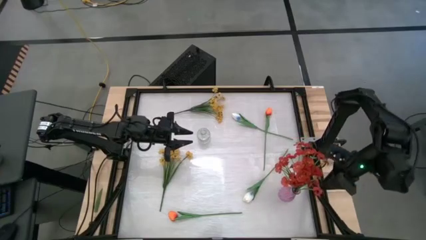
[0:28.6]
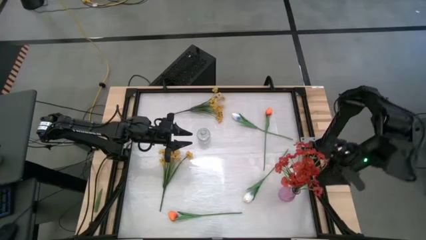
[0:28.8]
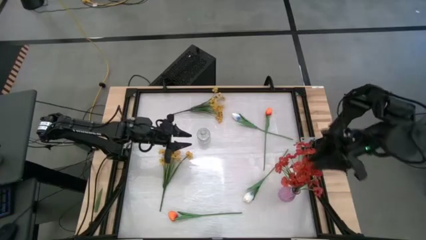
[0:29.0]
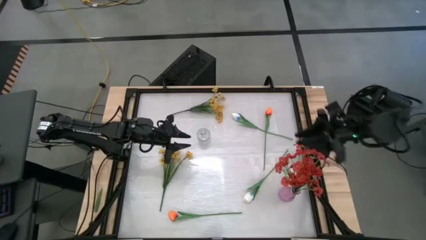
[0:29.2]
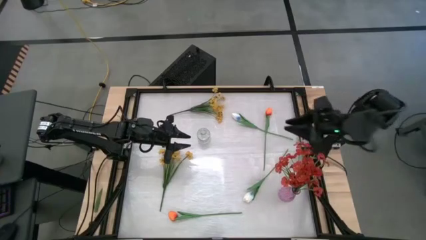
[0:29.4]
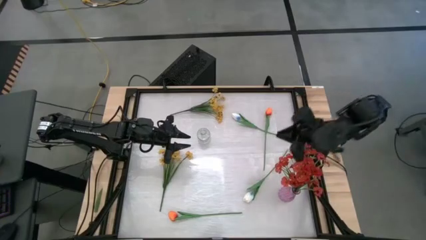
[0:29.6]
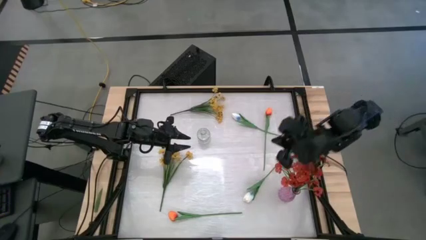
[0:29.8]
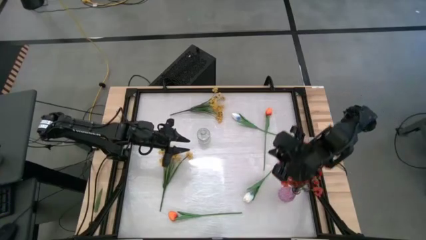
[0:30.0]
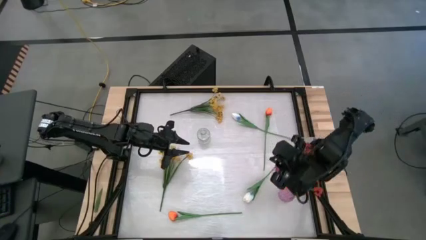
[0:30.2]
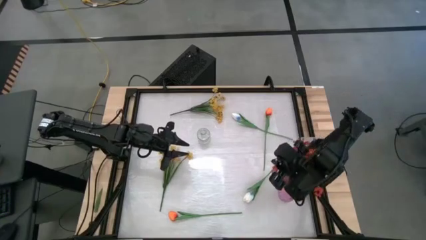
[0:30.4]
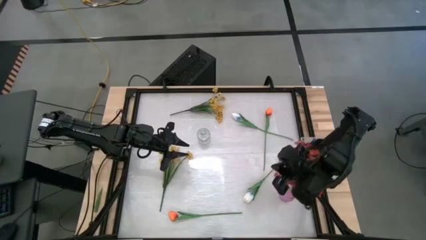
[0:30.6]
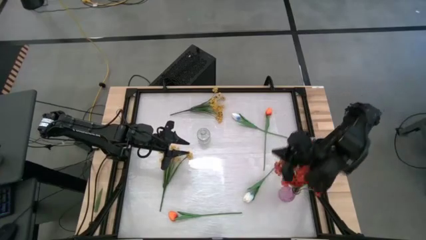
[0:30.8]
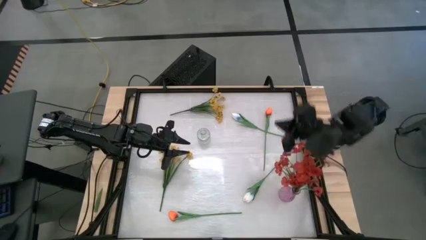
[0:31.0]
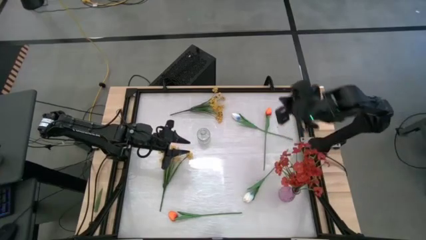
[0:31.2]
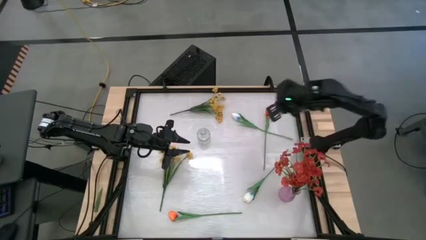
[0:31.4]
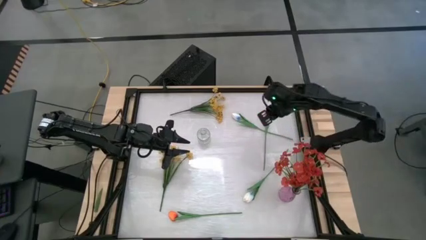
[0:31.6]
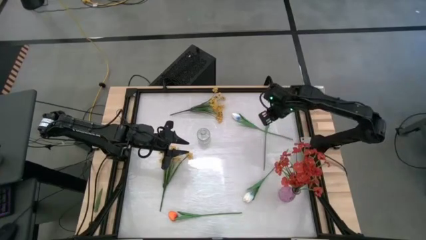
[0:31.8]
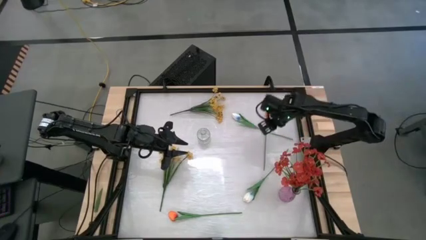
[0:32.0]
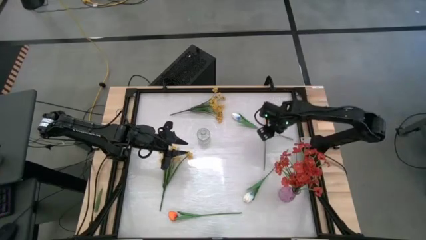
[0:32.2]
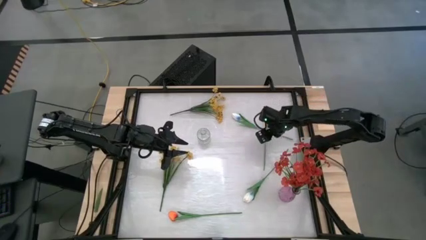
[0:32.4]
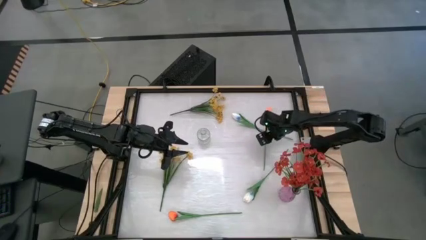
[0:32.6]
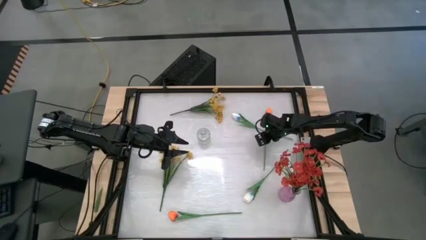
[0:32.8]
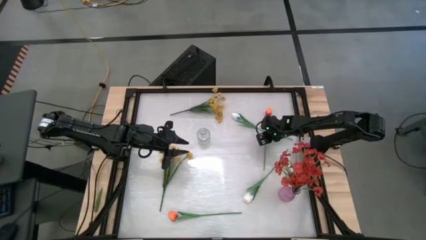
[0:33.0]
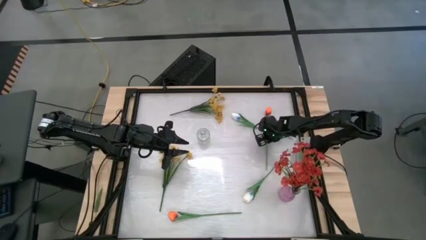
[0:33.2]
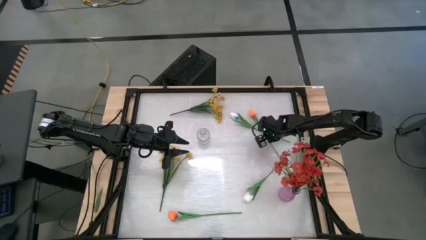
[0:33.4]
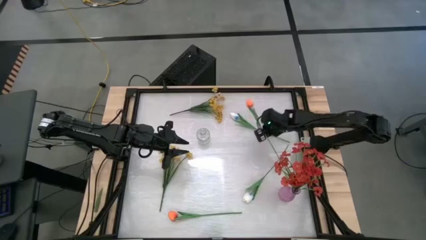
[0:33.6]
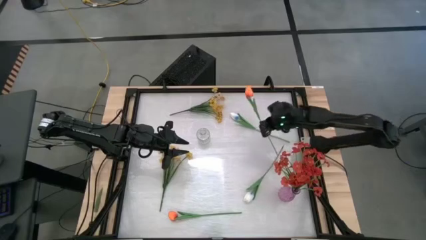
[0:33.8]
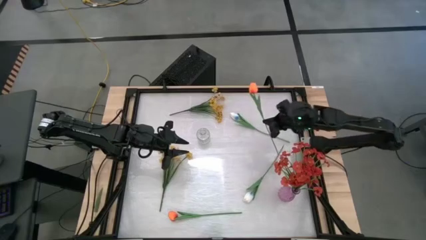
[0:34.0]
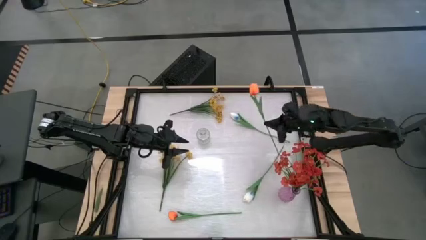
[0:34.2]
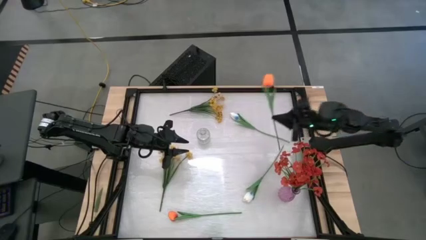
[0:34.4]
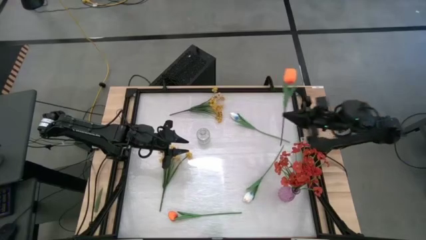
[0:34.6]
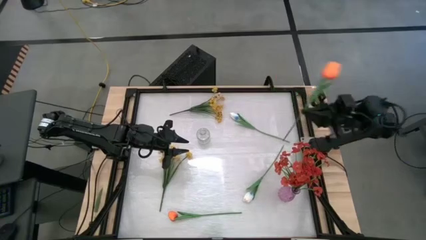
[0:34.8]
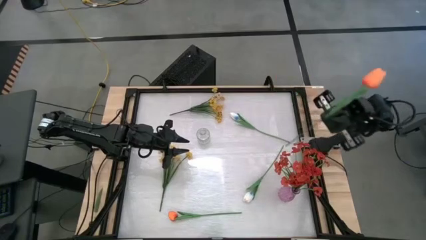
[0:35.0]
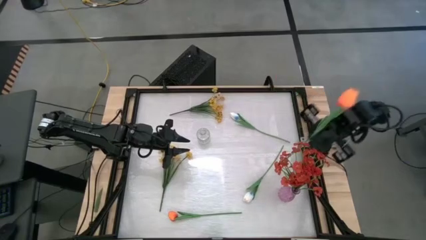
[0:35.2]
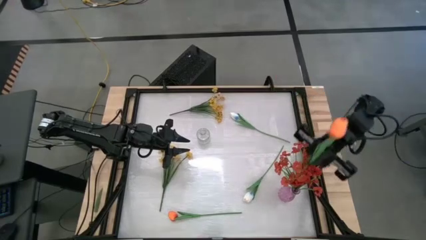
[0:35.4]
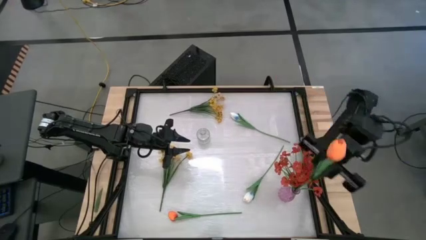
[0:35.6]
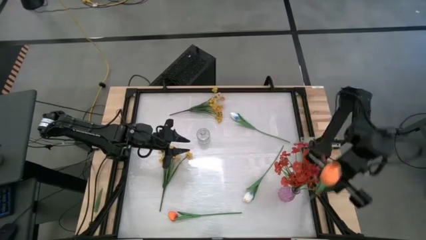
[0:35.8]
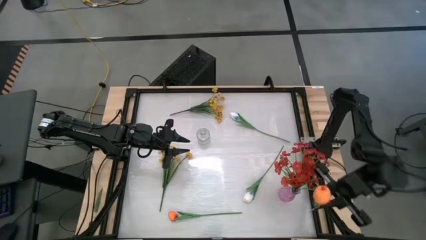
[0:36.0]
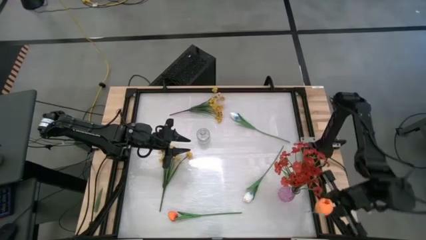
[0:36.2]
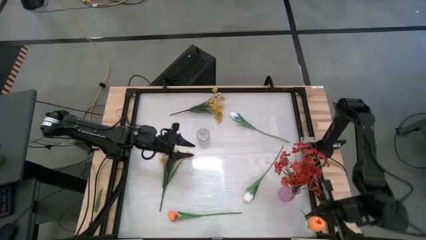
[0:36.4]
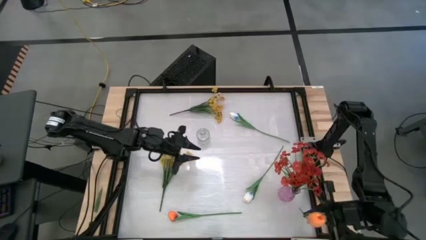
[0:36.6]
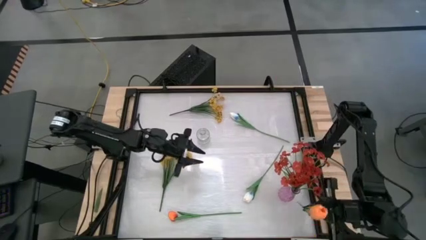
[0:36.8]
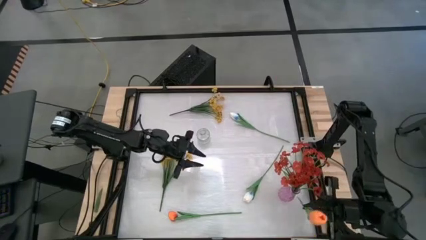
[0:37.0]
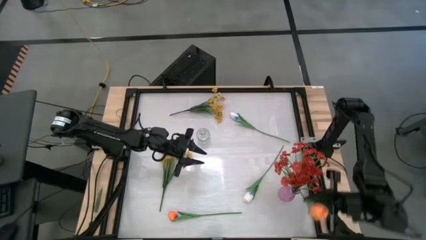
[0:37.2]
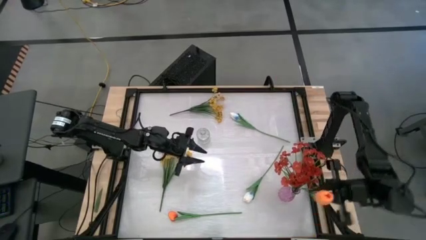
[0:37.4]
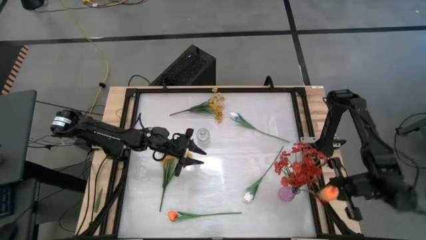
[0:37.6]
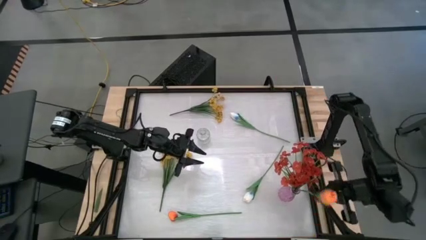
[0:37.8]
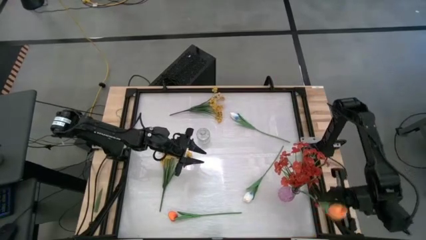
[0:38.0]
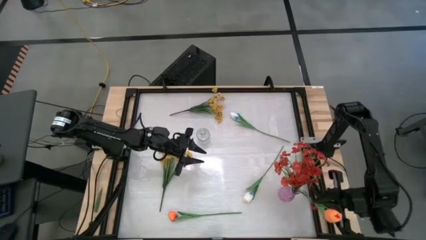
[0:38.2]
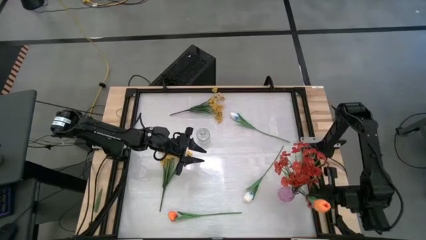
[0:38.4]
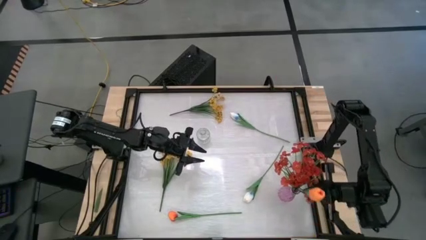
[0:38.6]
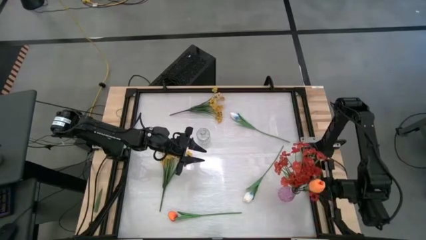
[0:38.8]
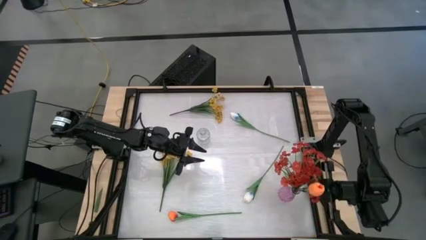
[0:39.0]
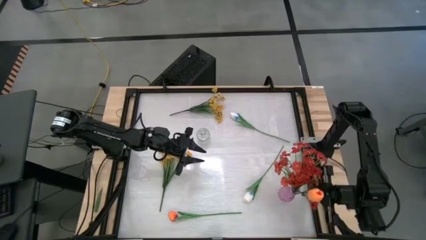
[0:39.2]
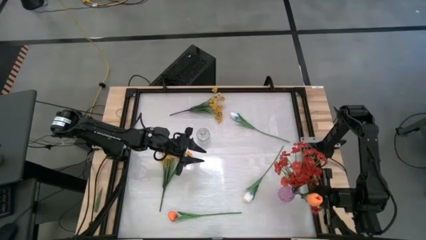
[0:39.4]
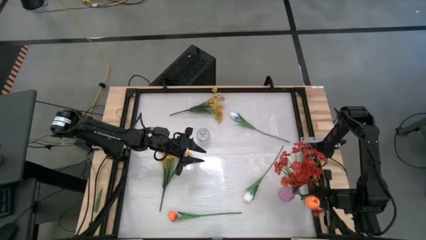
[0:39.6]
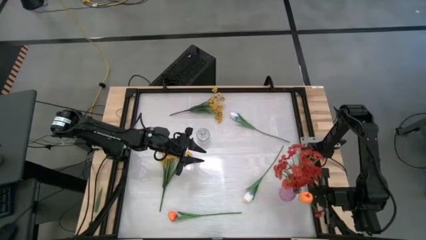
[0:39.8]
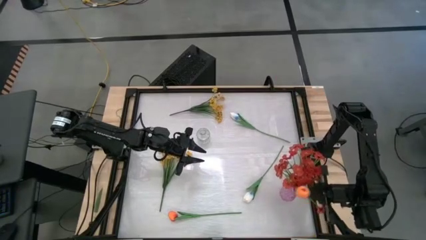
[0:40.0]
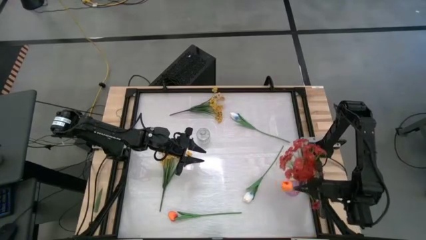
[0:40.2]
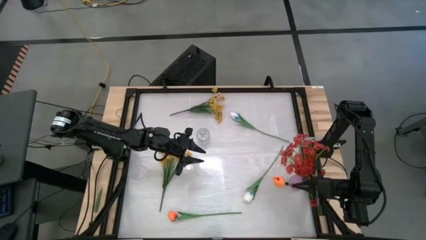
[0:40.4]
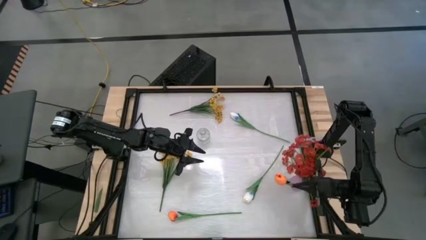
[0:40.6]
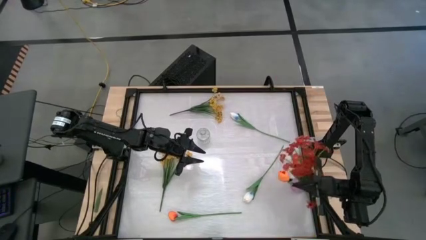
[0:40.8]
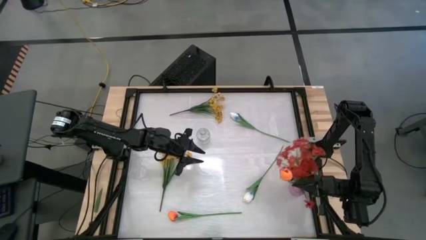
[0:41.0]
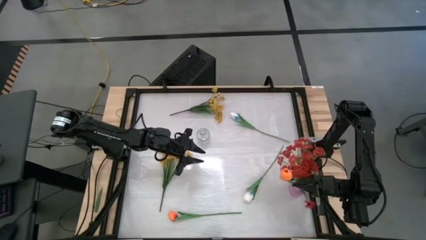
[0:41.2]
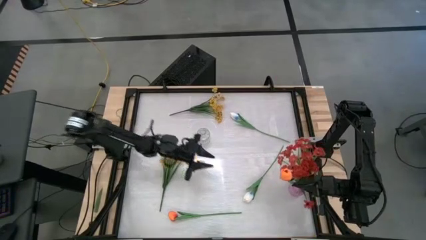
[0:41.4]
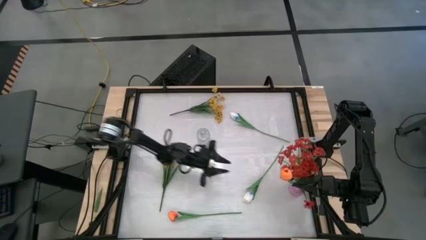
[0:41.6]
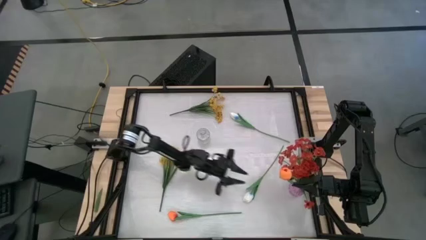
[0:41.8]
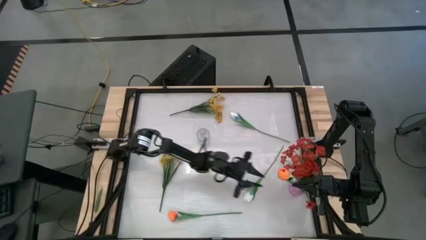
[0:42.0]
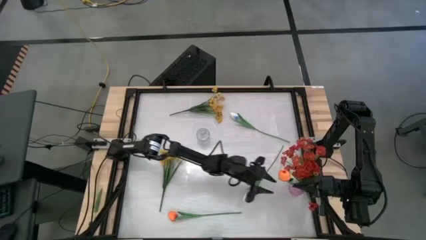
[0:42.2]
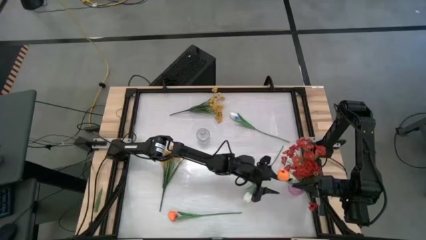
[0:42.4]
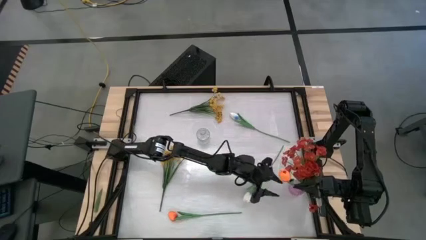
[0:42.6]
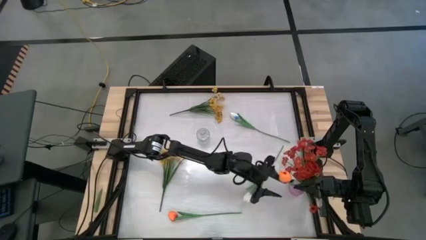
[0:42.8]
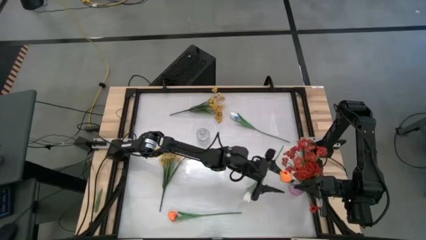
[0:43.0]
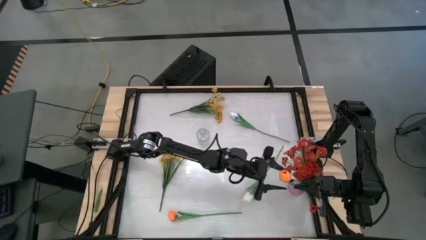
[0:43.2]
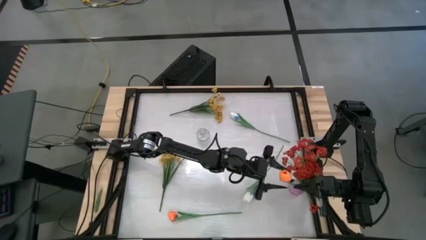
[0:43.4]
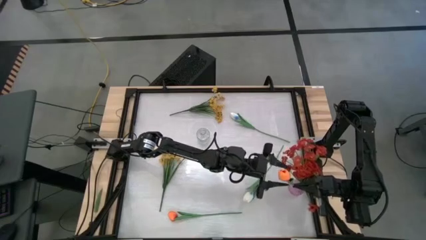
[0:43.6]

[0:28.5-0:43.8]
Task: Sort flowers into vase by color
Put the top orange flower into the pink vase
